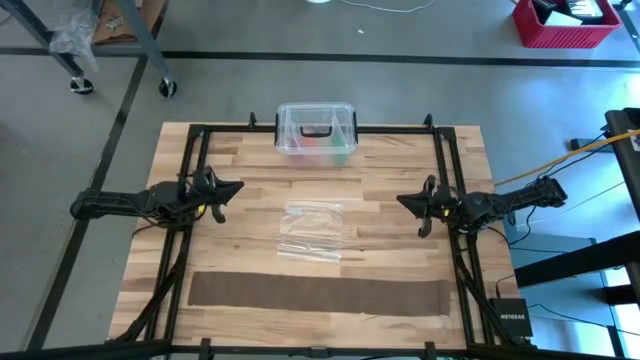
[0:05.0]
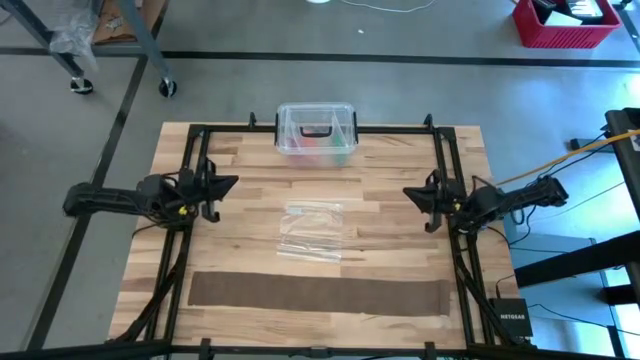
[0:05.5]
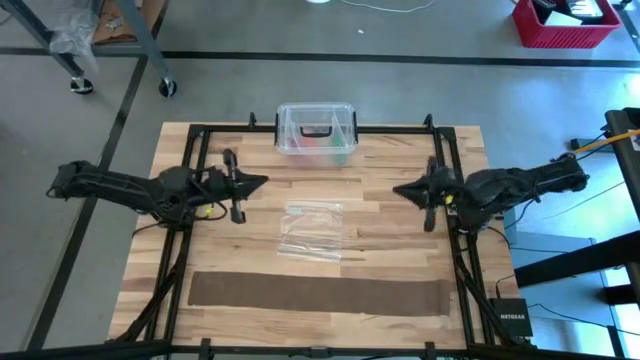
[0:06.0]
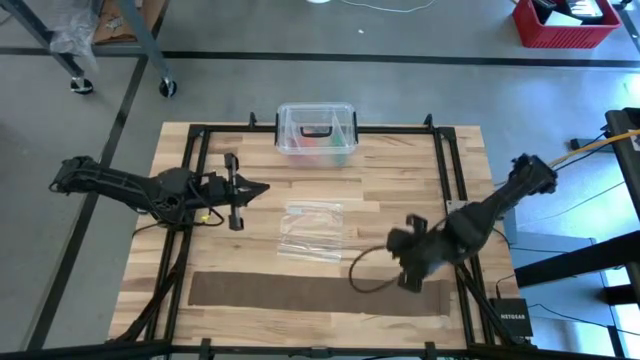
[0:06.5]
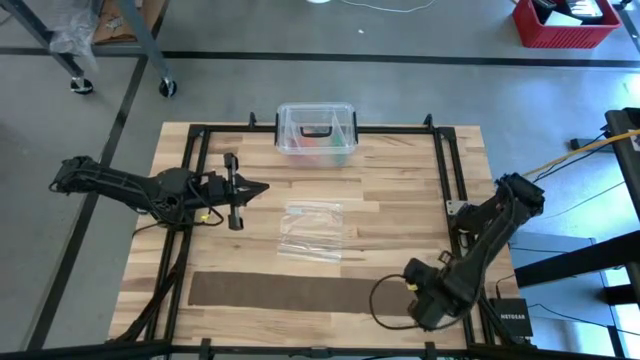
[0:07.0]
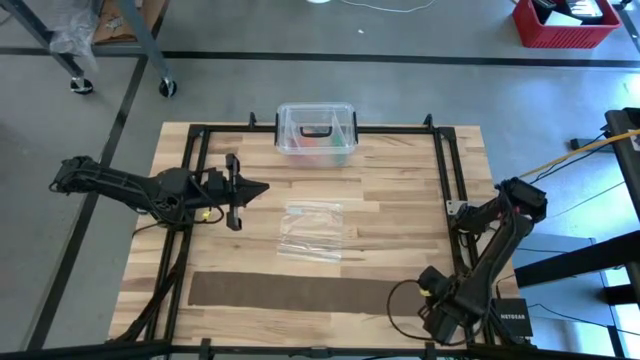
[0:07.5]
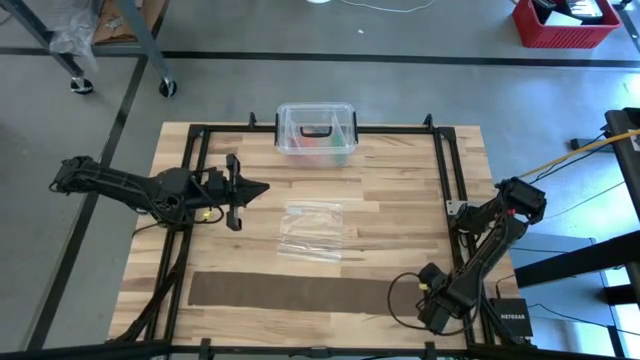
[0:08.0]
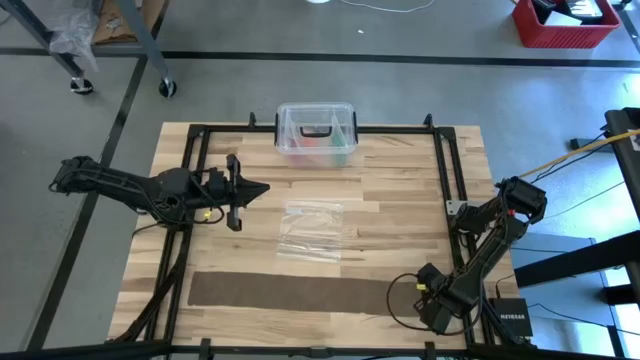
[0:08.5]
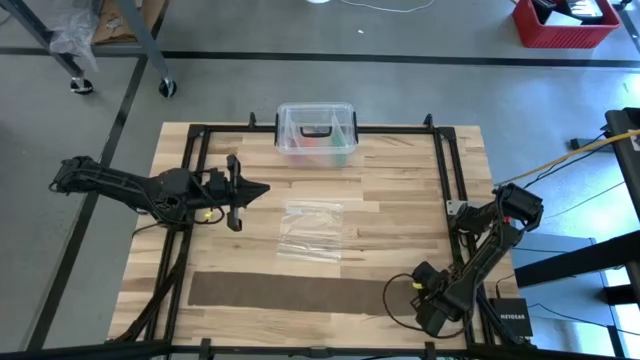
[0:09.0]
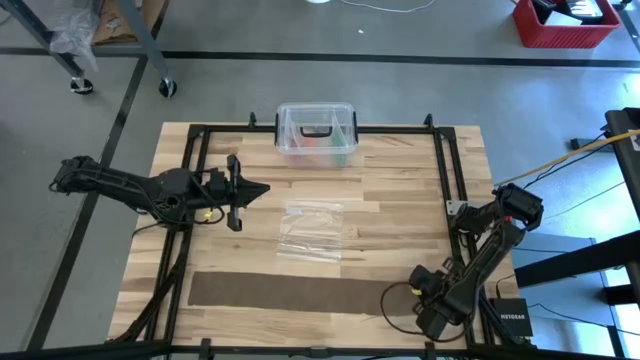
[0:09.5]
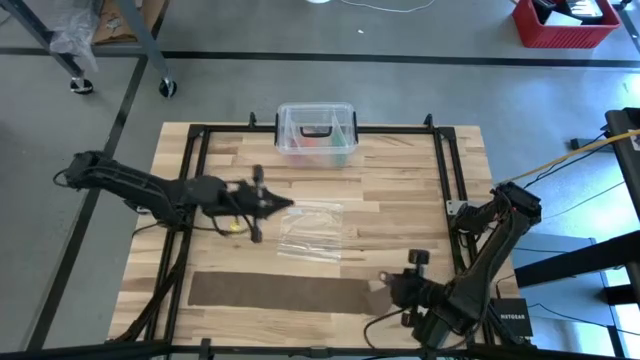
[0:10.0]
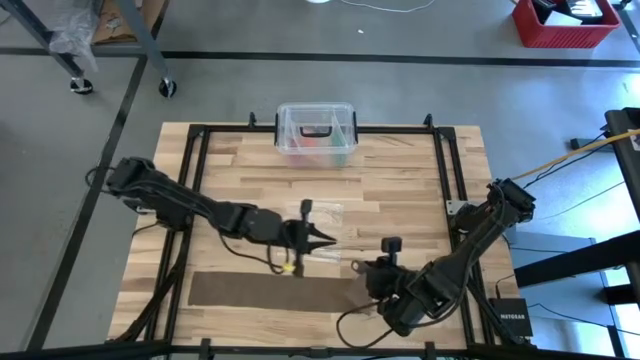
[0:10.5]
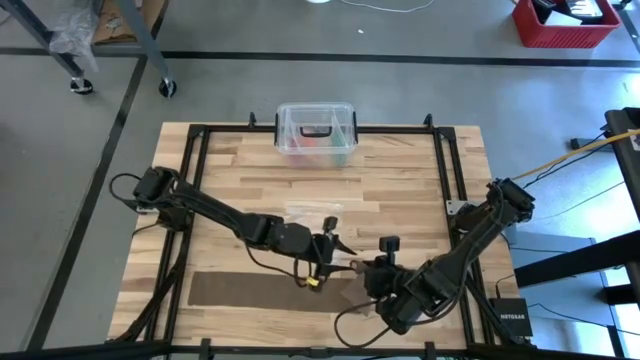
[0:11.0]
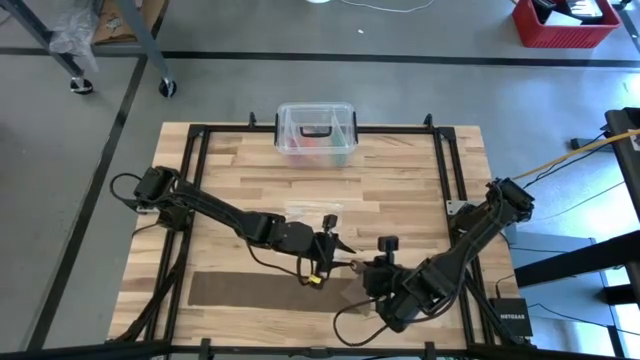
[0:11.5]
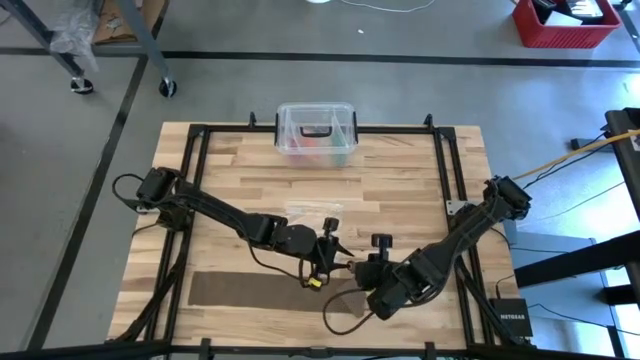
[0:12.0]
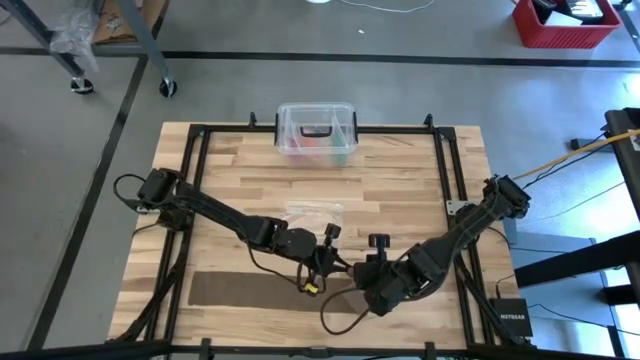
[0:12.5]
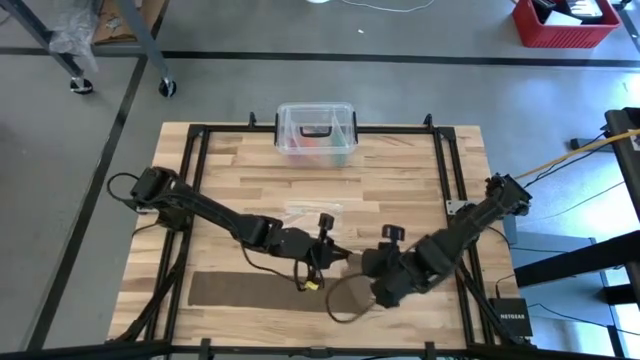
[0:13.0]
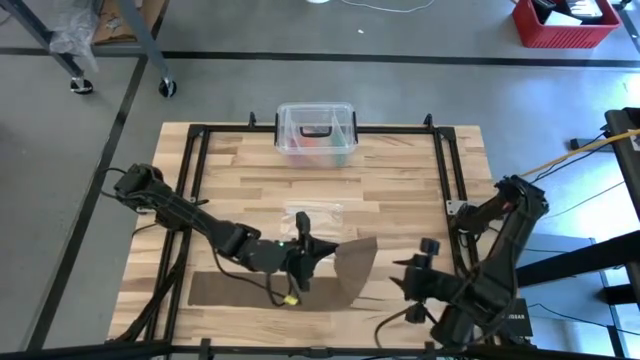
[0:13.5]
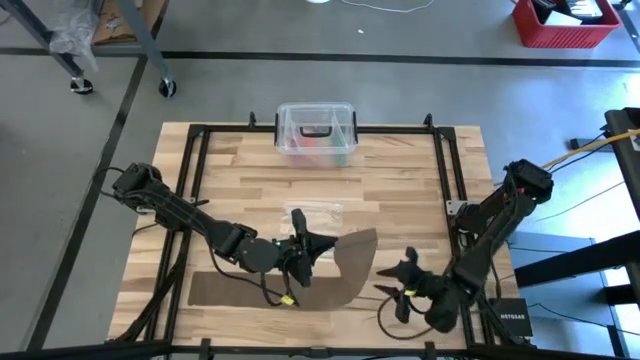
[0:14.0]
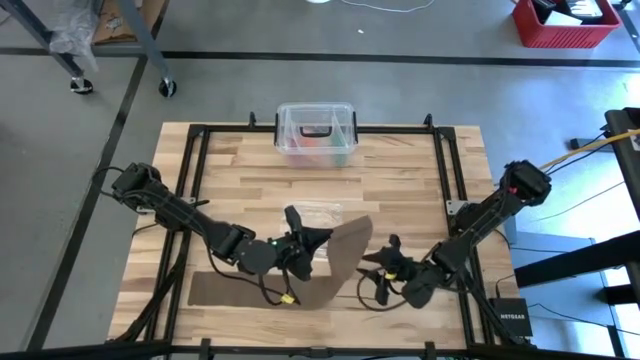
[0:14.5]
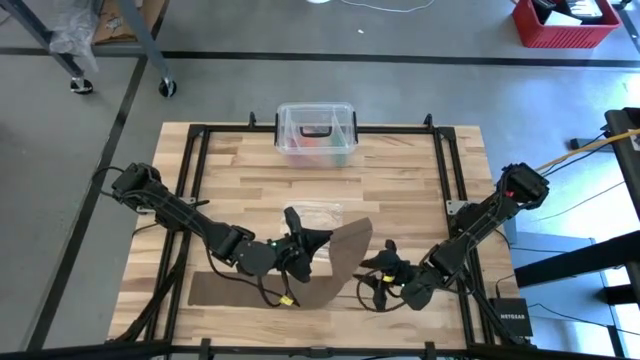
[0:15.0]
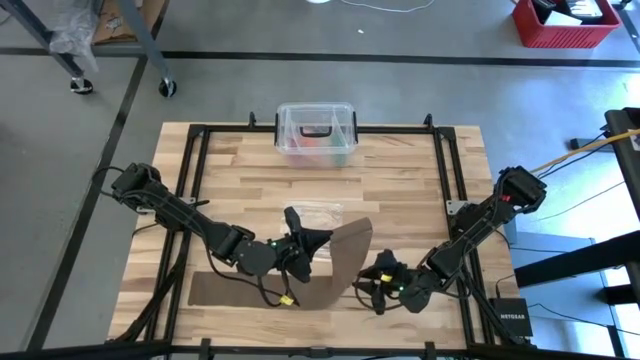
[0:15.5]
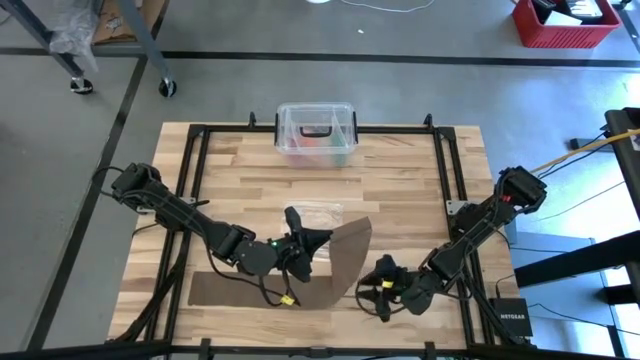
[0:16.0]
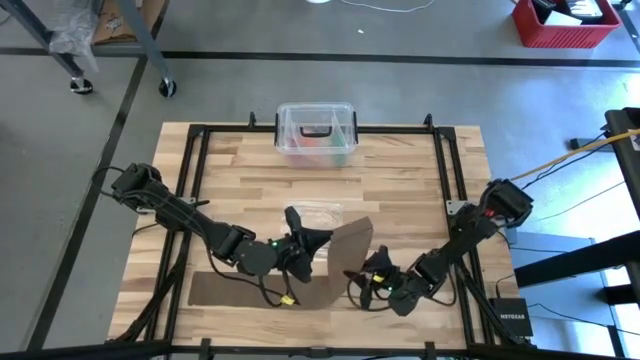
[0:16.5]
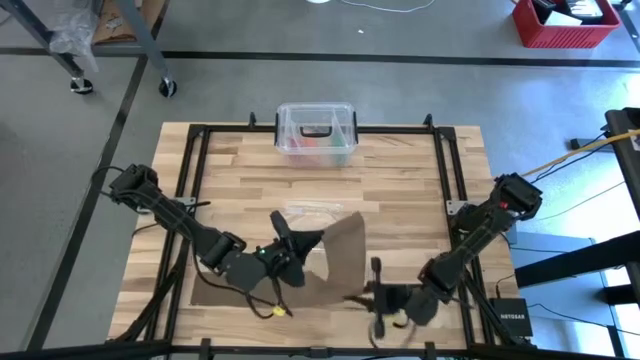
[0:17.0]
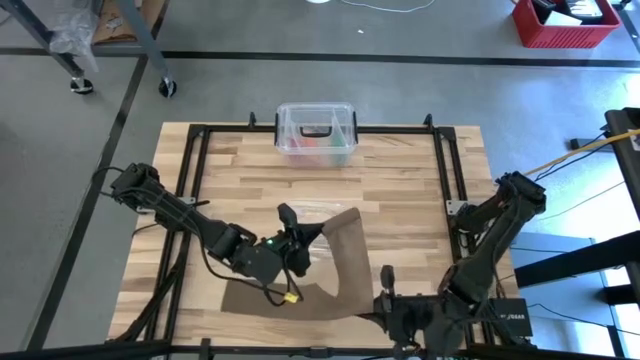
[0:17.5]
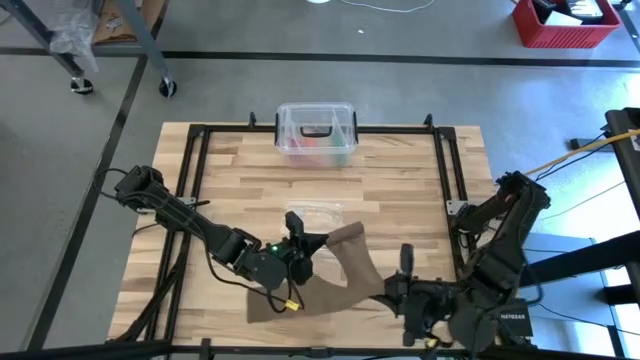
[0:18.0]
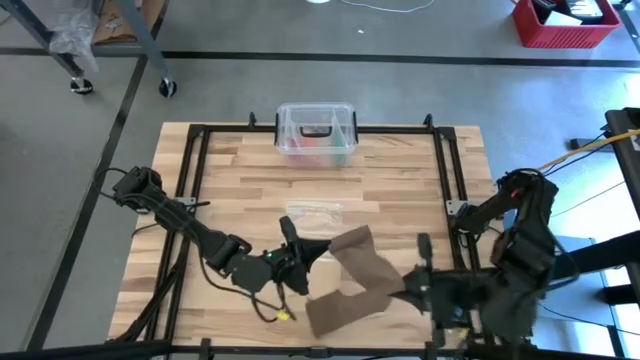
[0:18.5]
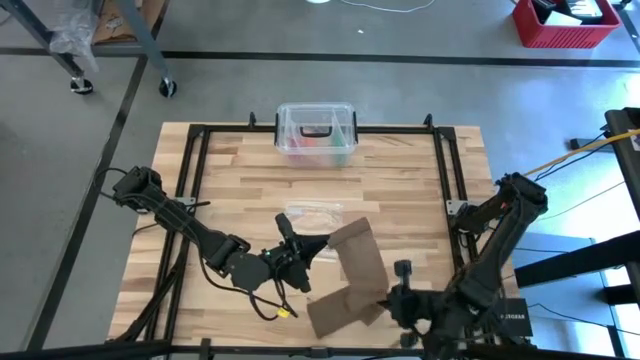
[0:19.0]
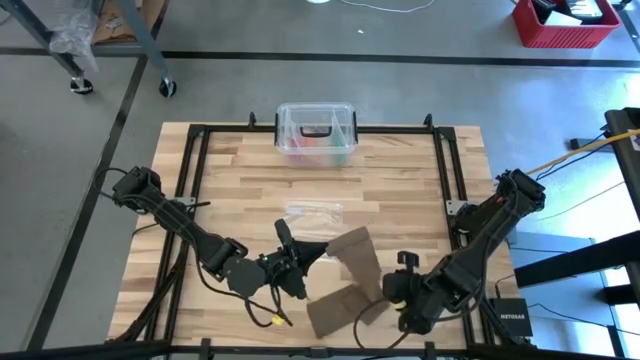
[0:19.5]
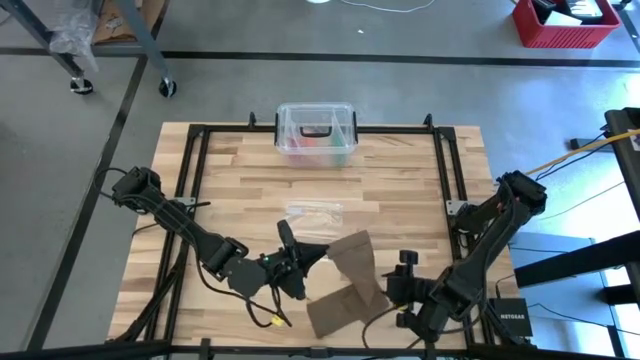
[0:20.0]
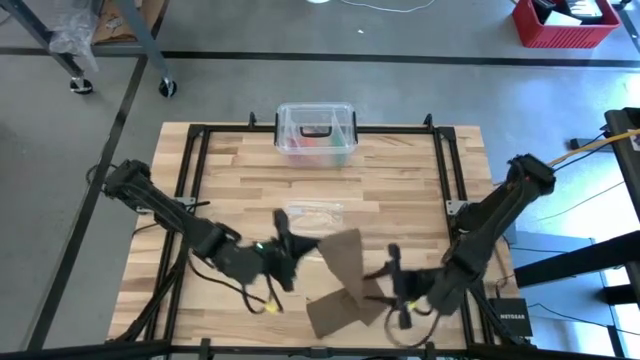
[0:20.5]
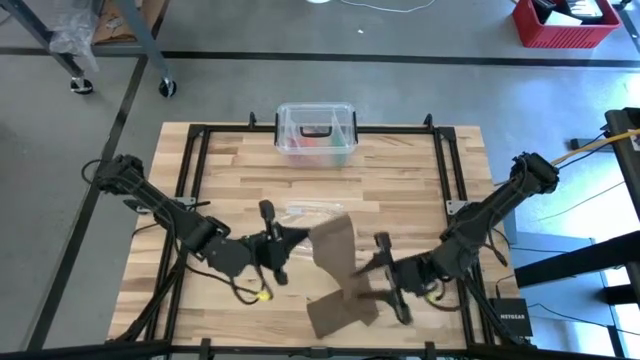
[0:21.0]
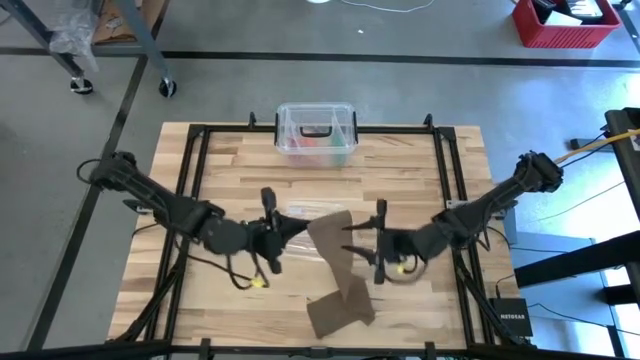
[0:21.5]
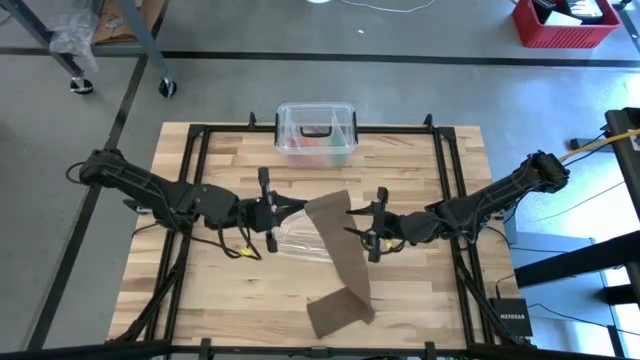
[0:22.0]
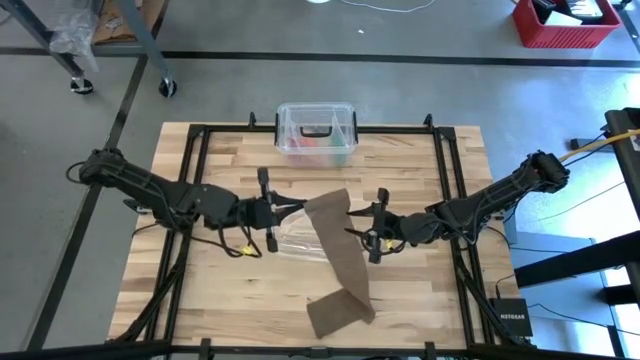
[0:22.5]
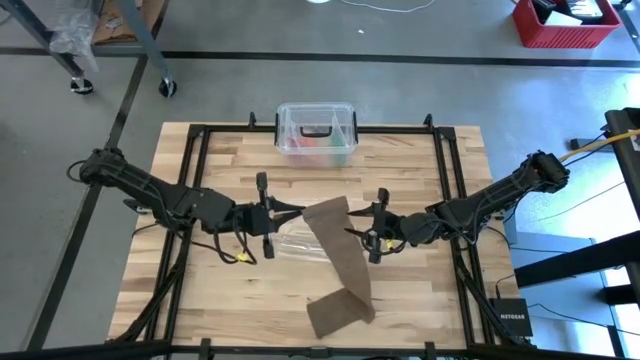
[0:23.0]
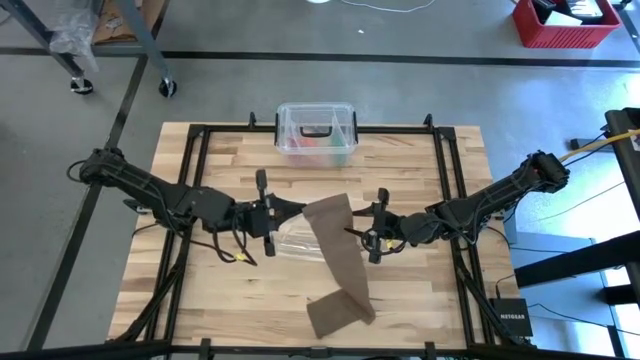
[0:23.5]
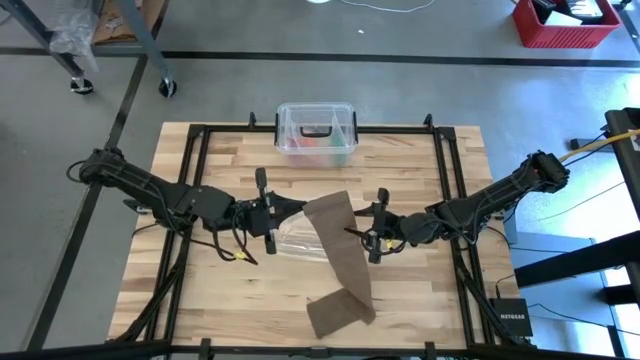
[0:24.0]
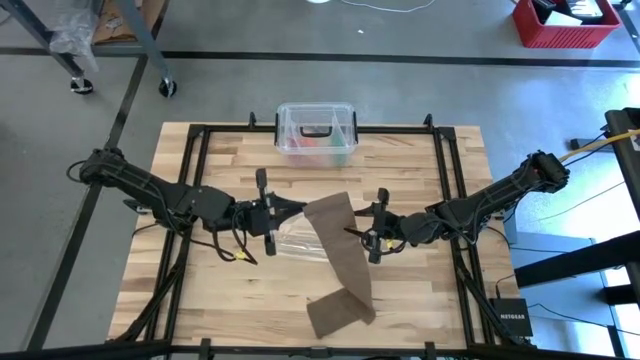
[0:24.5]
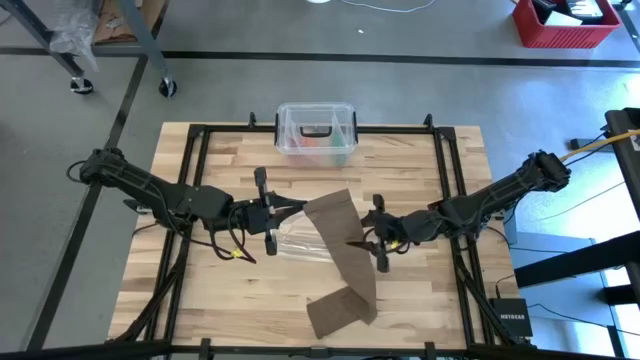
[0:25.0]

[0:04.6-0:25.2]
Task: Roll bandage
Roll the brown bandage
